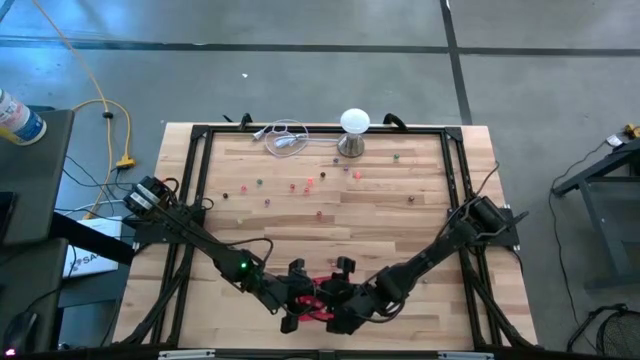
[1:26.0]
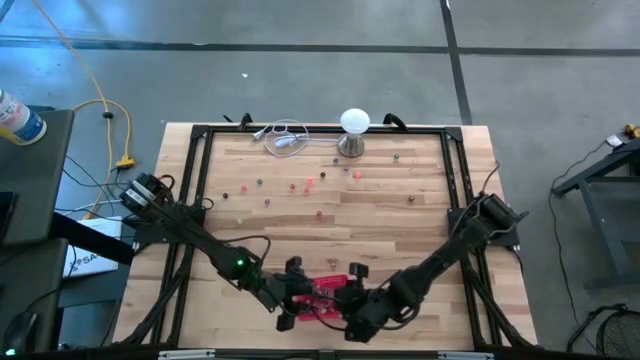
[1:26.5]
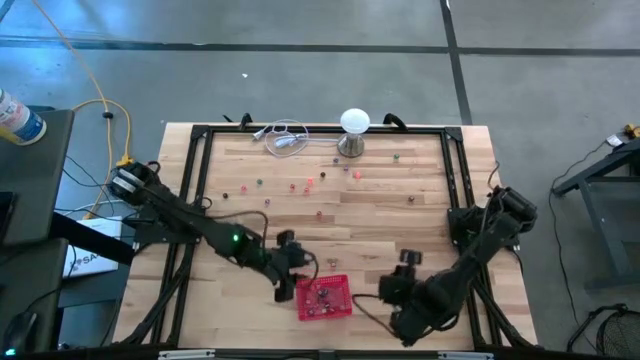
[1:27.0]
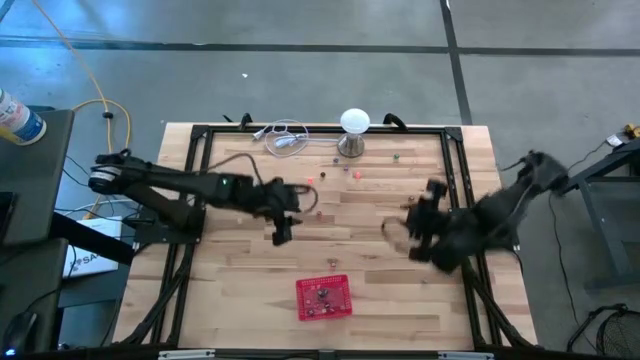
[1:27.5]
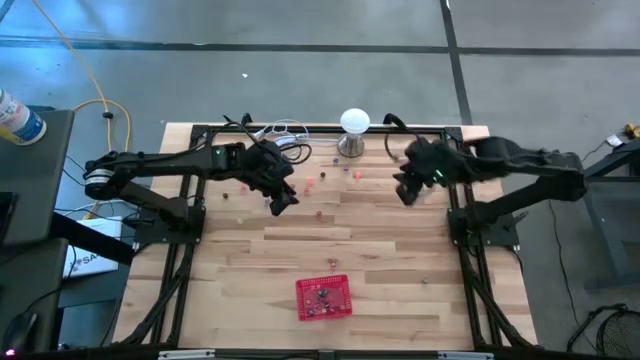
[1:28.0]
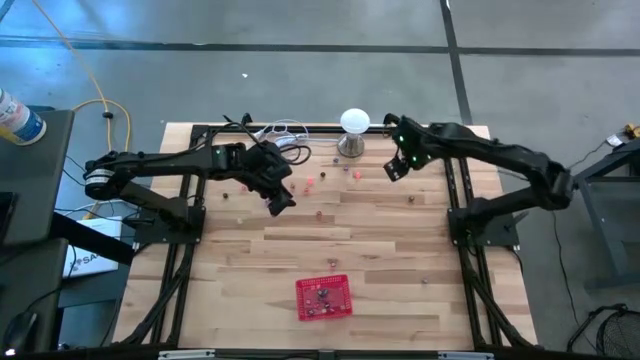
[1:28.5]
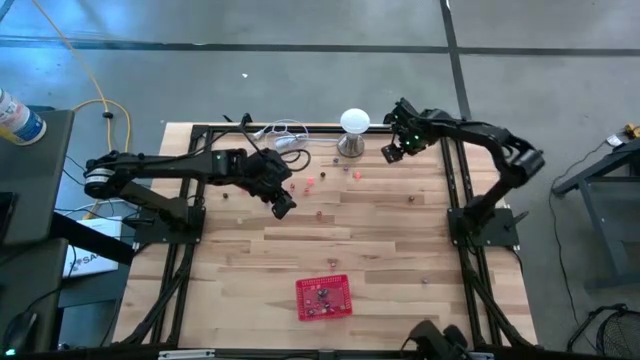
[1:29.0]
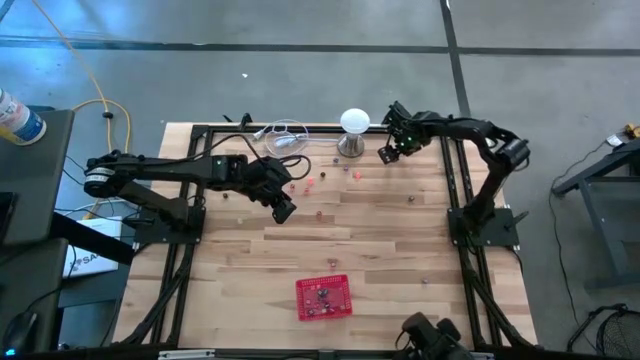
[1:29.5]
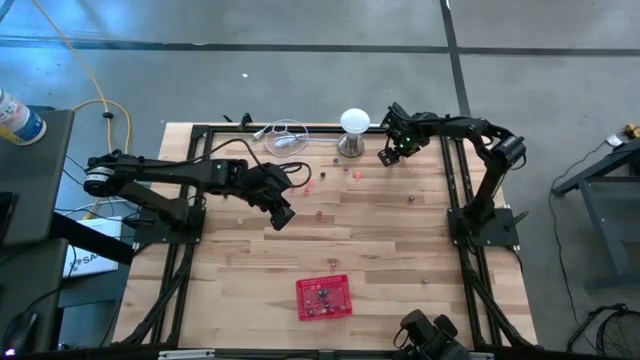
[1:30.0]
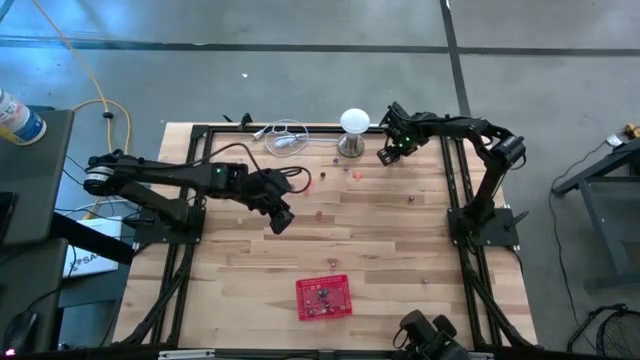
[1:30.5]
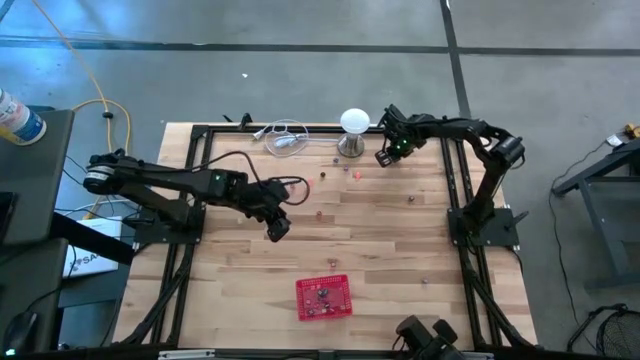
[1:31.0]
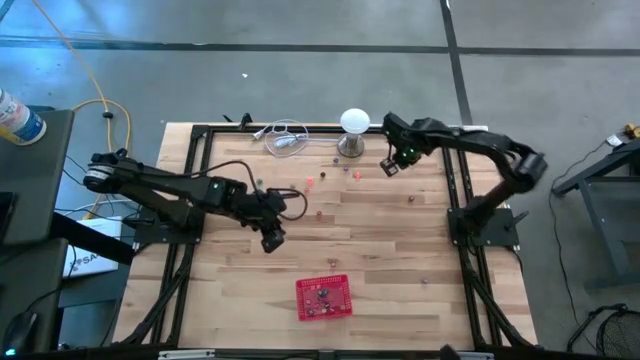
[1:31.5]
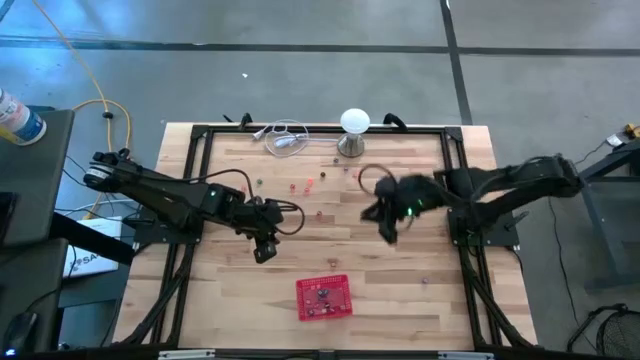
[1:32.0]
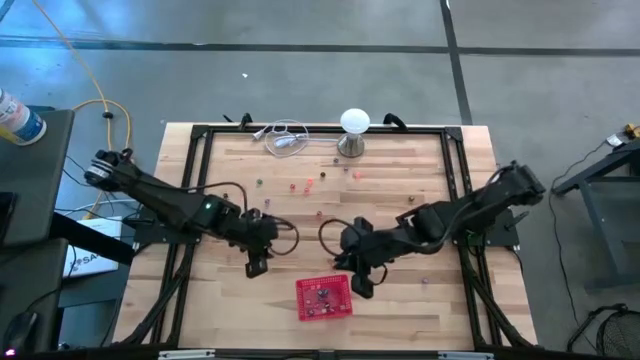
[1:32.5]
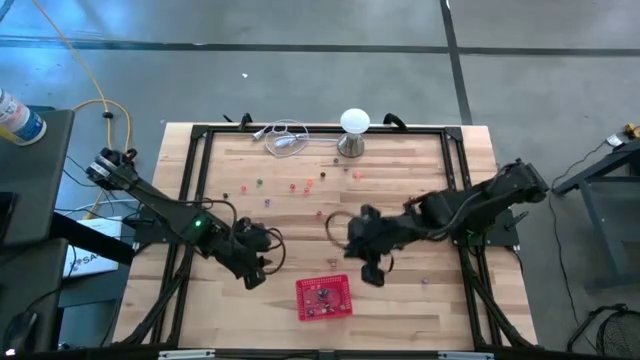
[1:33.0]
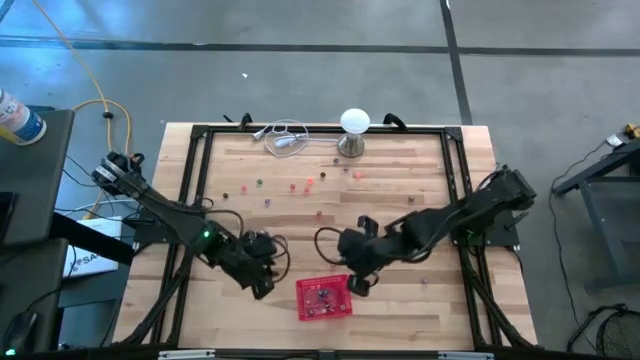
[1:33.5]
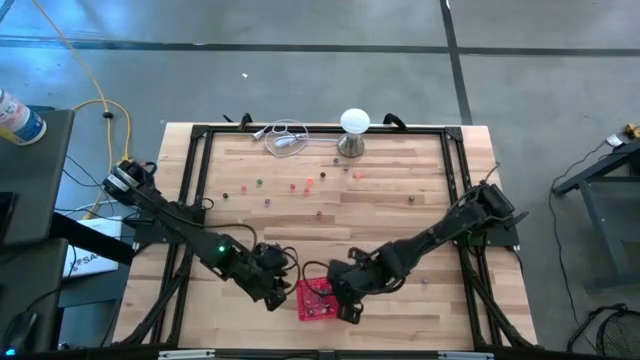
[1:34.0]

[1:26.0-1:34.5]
Task: Pick & Place Dice
Put the green dice into the red bin

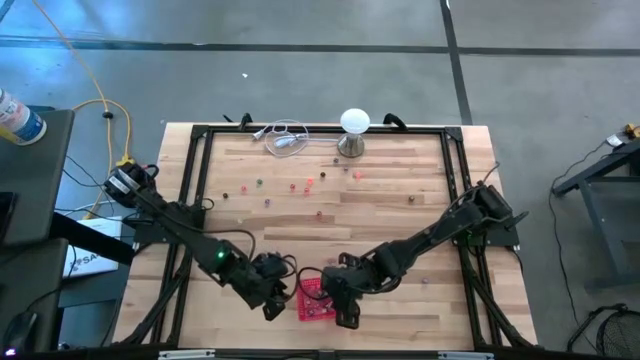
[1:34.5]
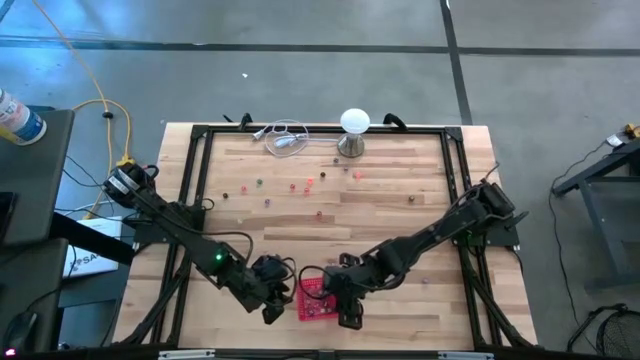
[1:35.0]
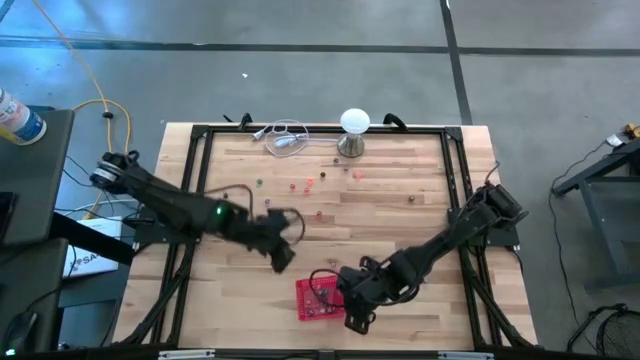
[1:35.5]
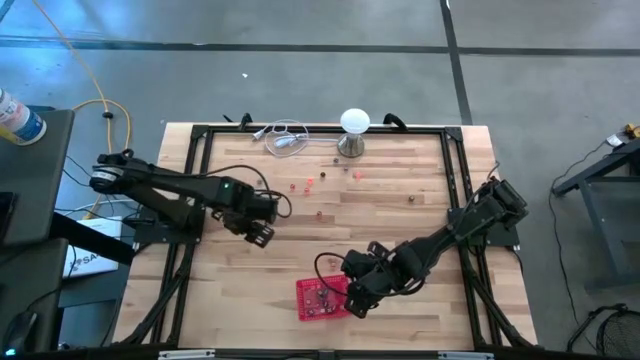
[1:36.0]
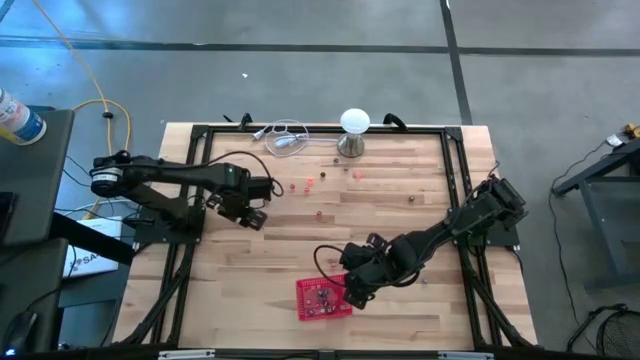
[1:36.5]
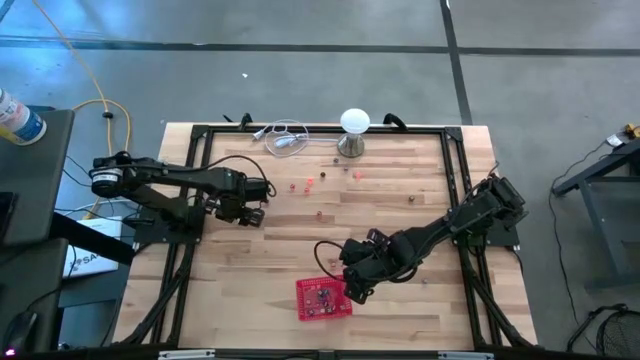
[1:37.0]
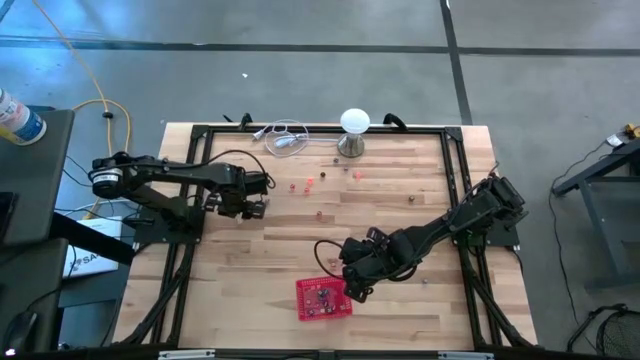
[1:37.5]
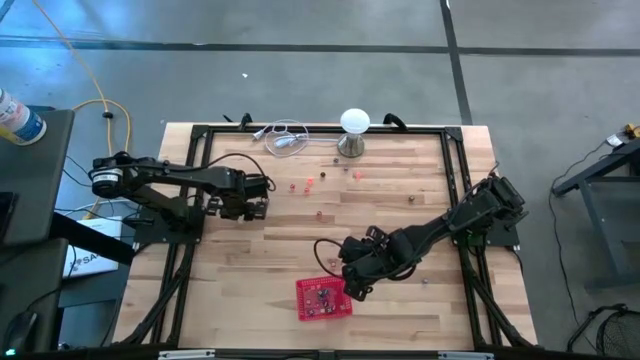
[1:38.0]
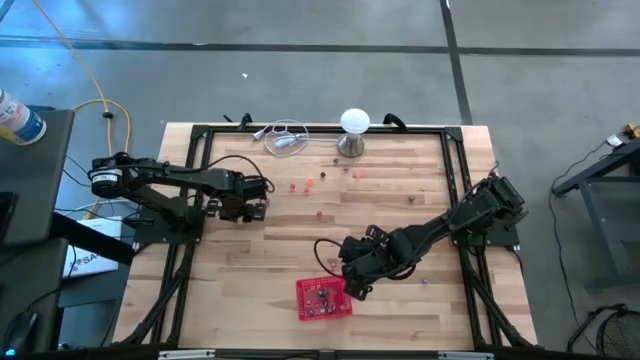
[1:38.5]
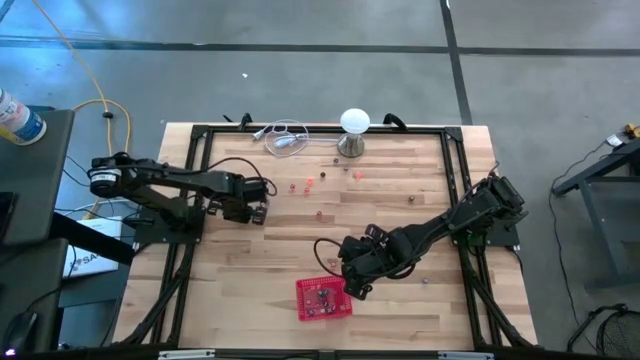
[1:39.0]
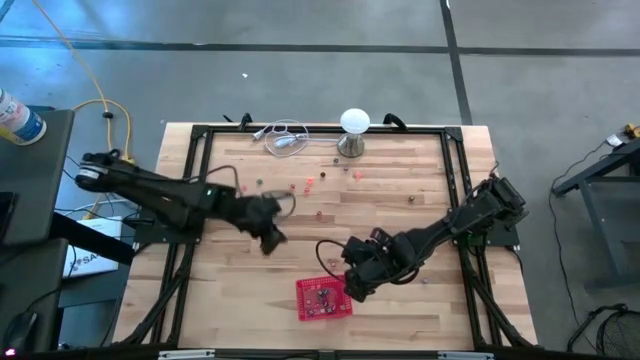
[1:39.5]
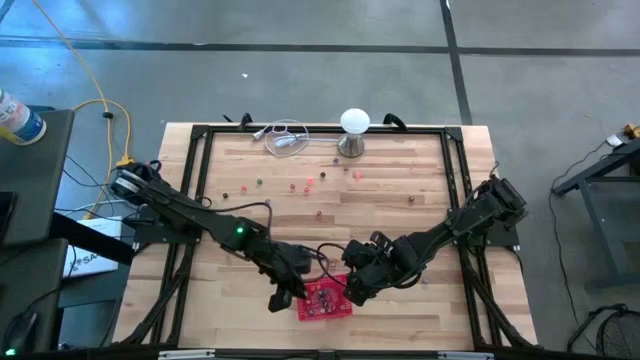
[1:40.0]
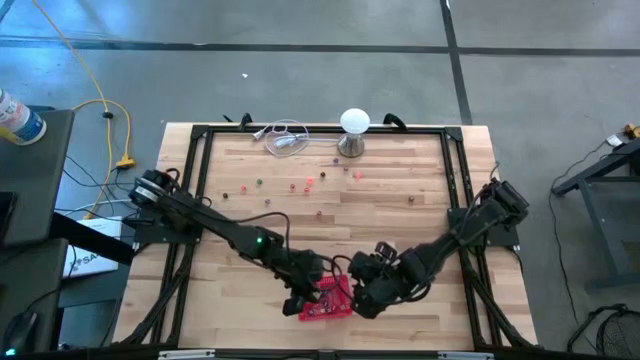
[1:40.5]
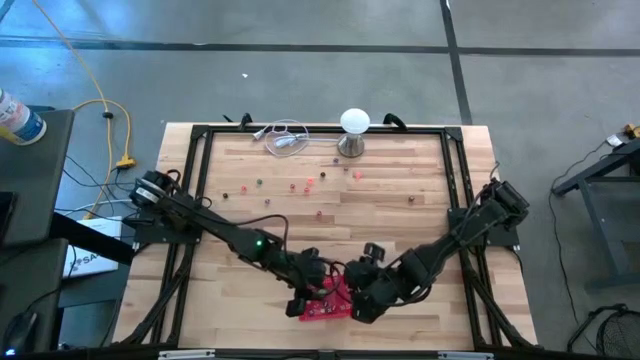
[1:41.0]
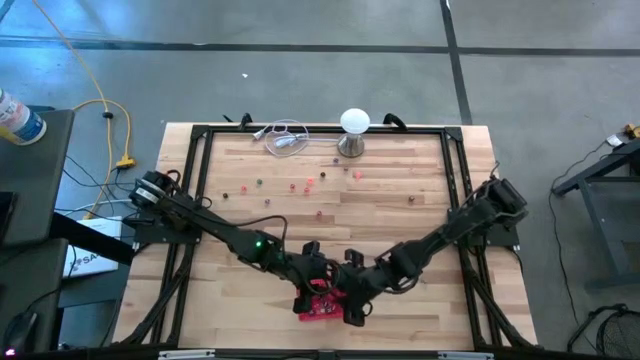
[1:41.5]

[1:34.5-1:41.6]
Put the yellow dice into the red bin

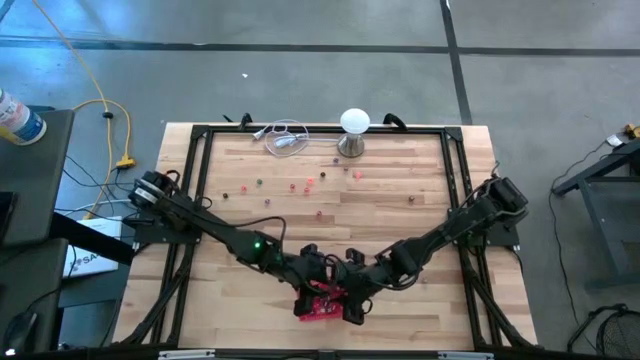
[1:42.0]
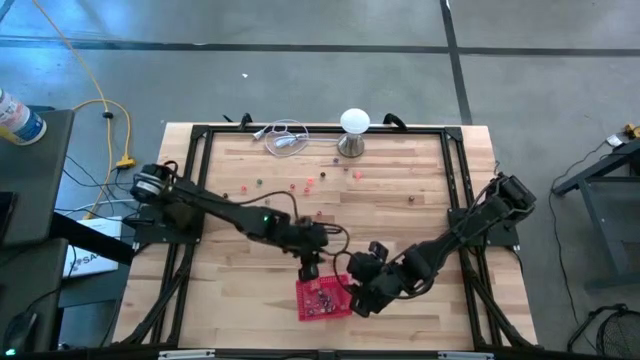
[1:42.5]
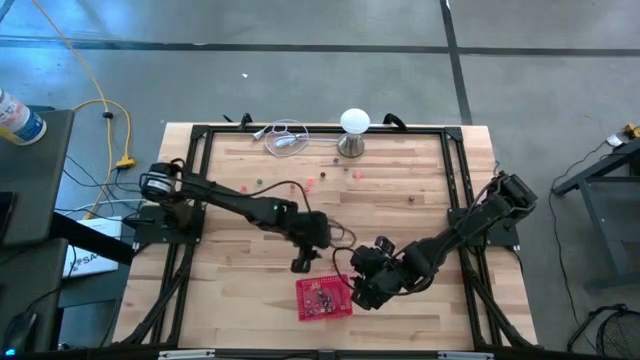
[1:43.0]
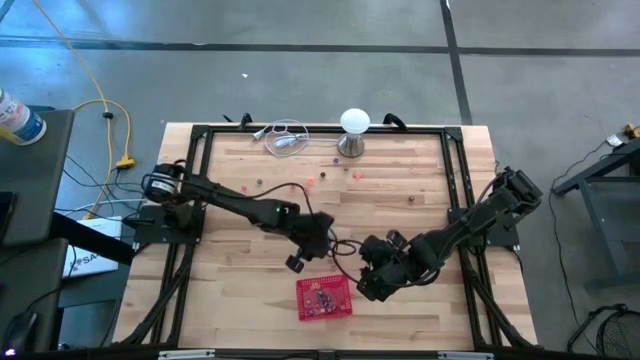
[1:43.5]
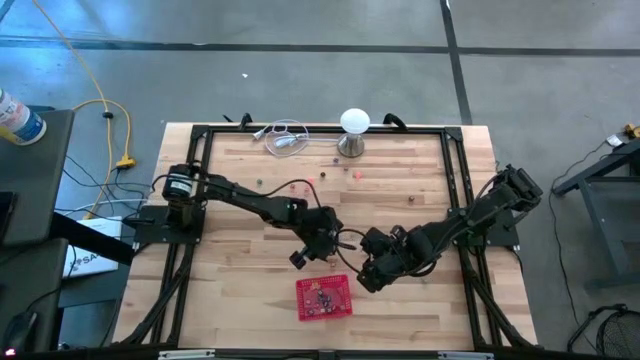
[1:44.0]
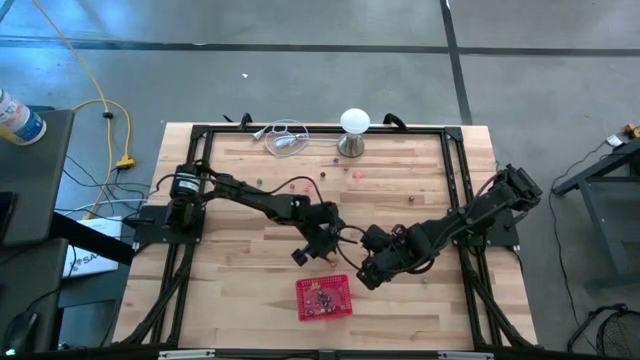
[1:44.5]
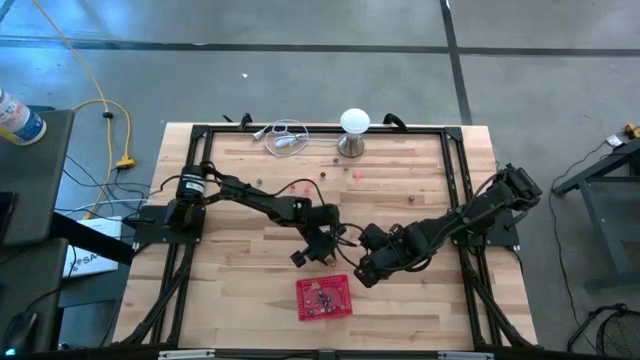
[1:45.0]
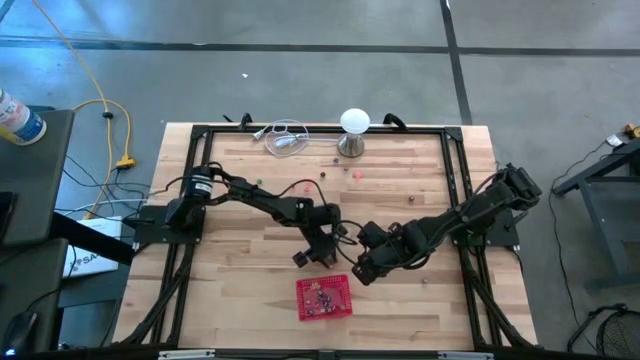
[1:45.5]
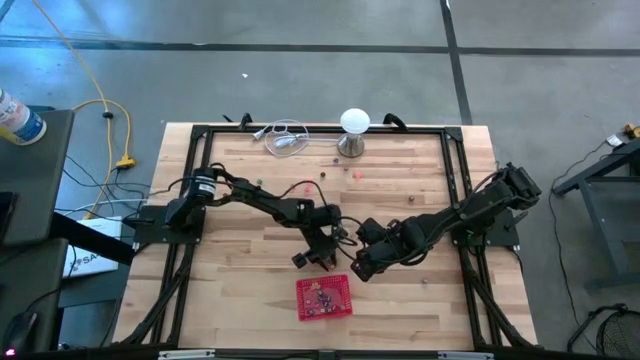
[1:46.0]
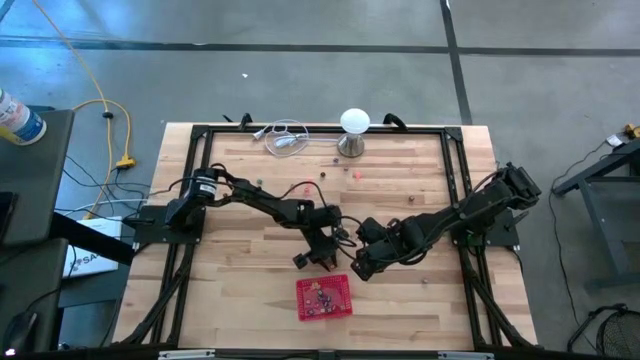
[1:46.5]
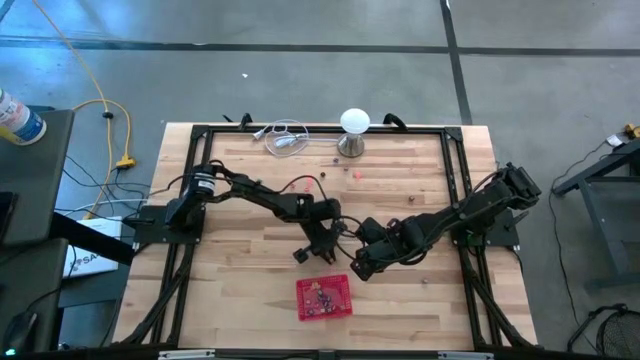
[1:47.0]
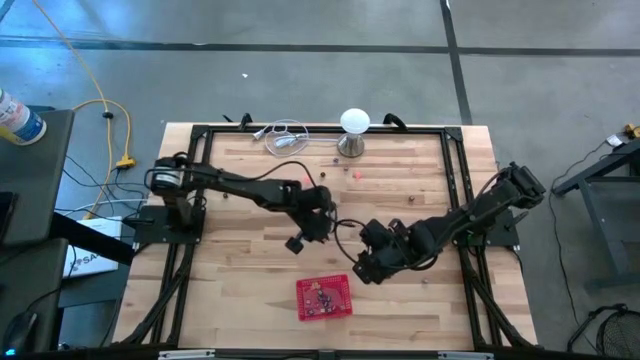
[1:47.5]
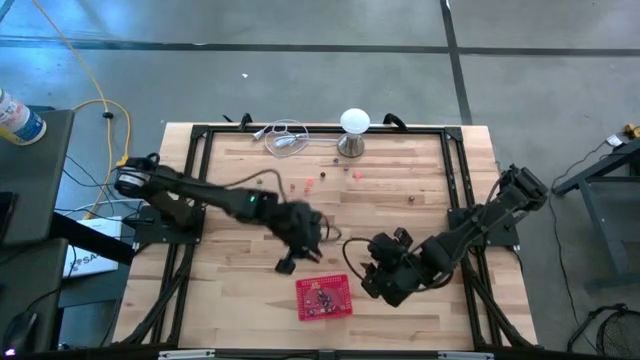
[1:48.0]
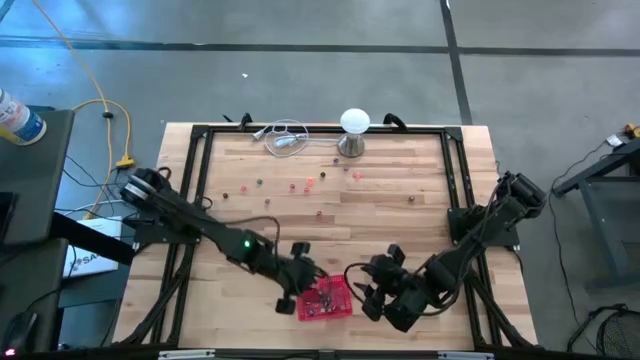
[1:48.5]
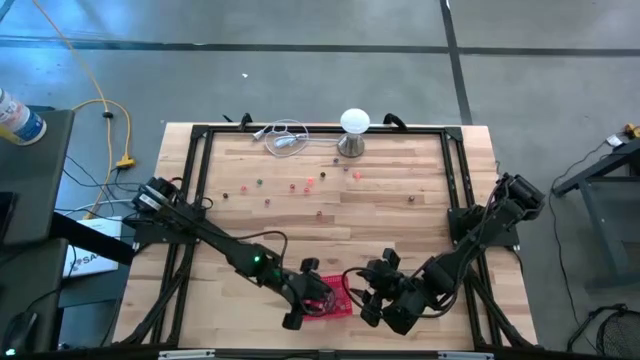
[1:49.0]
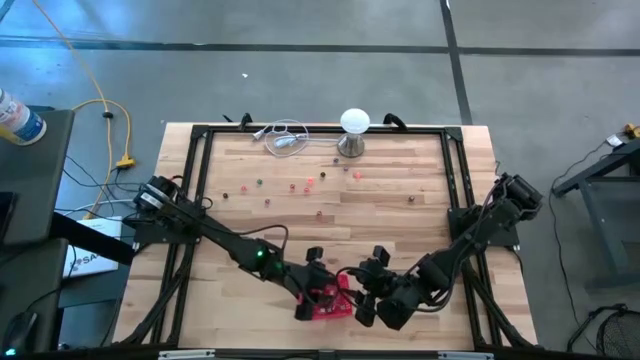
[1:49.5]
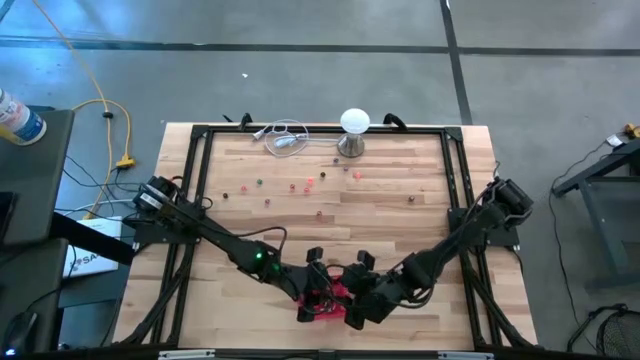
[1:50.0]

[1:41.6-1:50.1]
Put the red dice into the red bin
